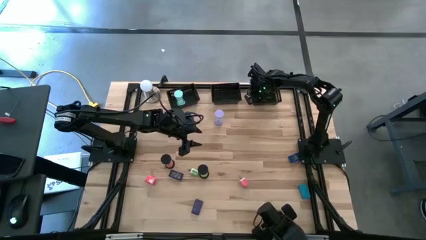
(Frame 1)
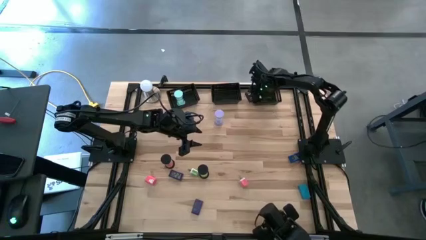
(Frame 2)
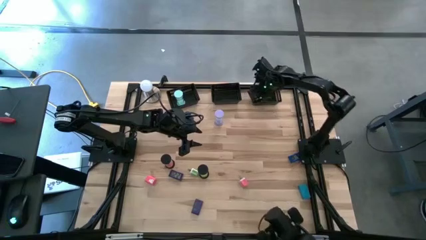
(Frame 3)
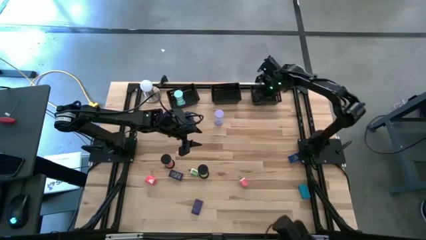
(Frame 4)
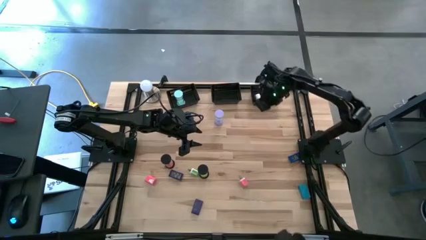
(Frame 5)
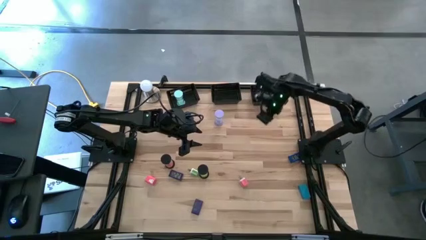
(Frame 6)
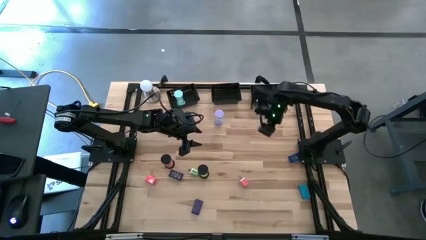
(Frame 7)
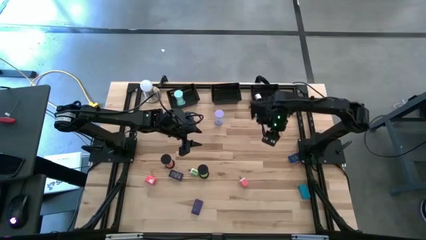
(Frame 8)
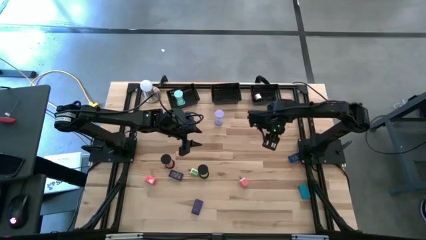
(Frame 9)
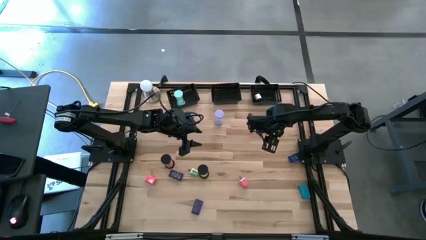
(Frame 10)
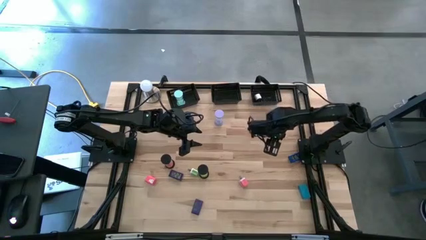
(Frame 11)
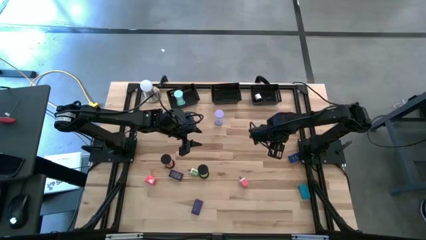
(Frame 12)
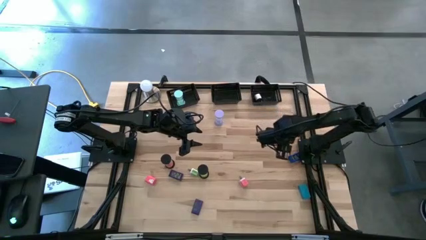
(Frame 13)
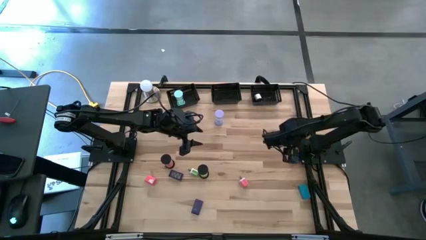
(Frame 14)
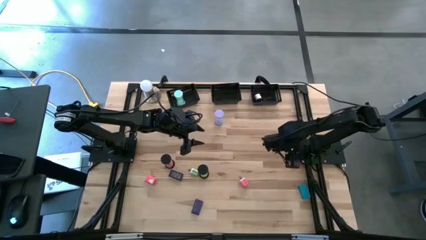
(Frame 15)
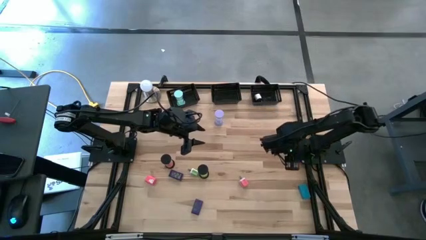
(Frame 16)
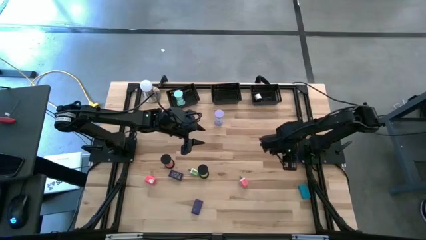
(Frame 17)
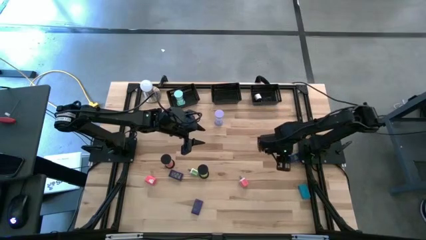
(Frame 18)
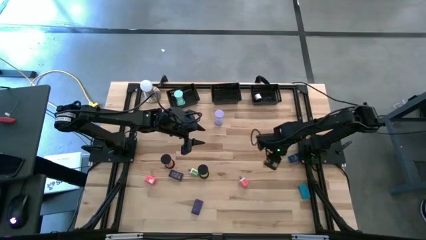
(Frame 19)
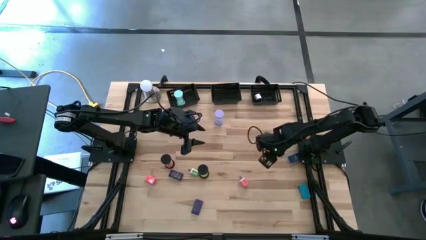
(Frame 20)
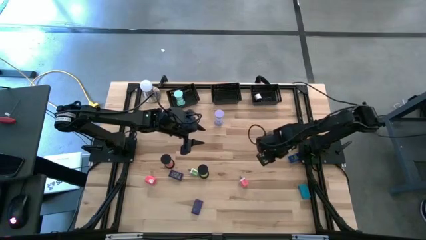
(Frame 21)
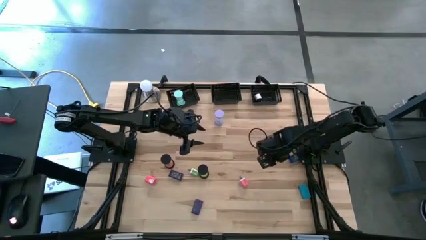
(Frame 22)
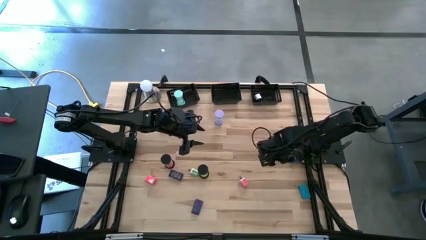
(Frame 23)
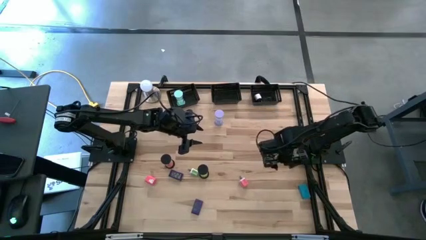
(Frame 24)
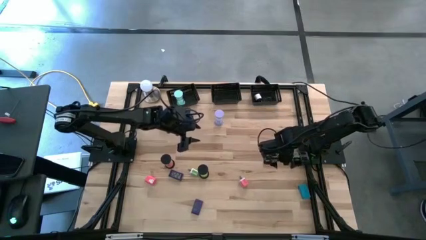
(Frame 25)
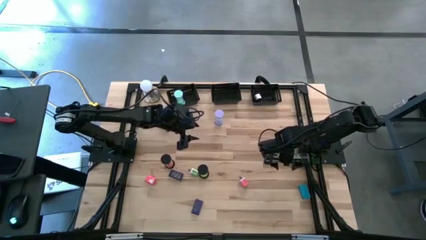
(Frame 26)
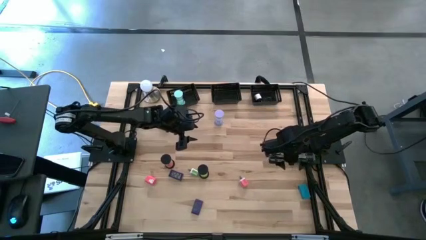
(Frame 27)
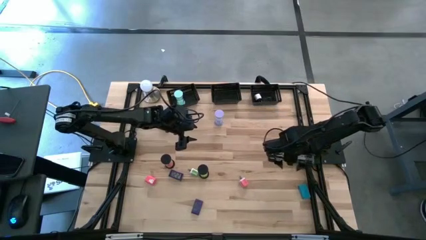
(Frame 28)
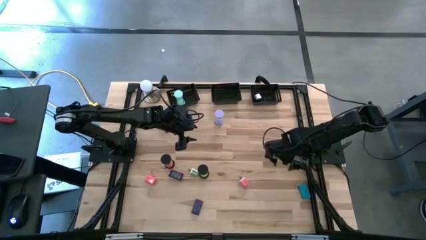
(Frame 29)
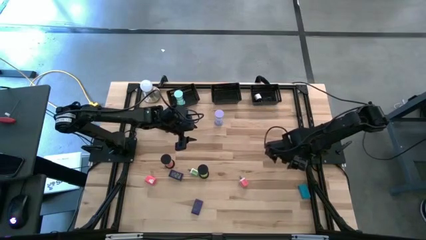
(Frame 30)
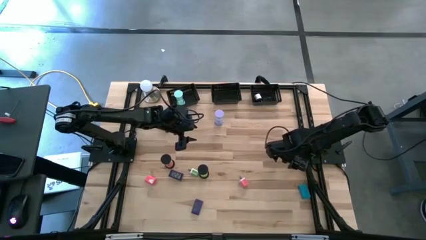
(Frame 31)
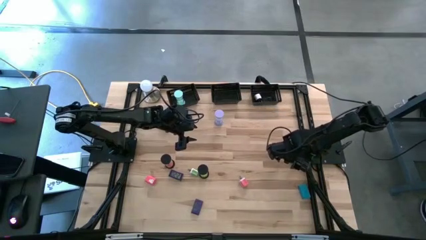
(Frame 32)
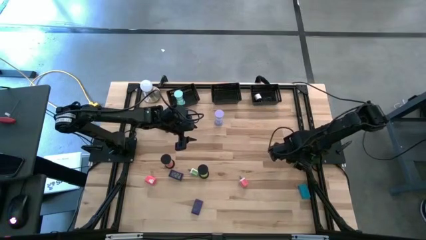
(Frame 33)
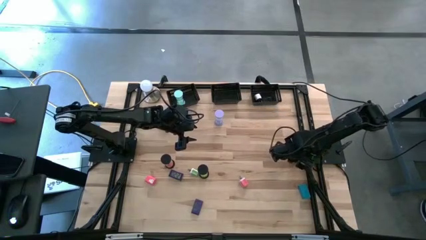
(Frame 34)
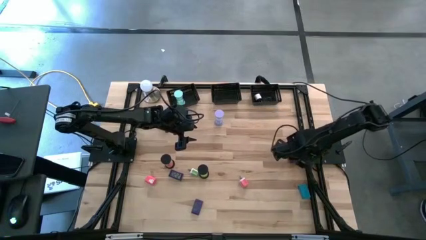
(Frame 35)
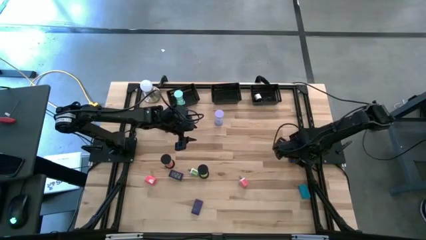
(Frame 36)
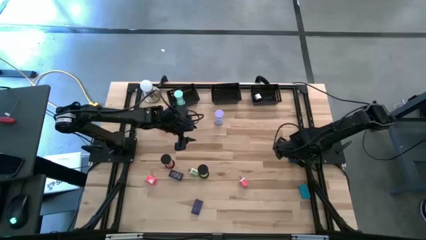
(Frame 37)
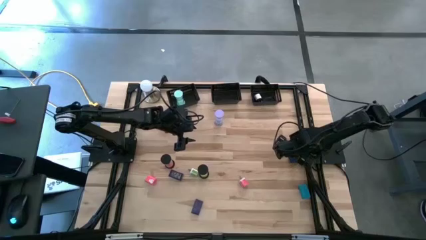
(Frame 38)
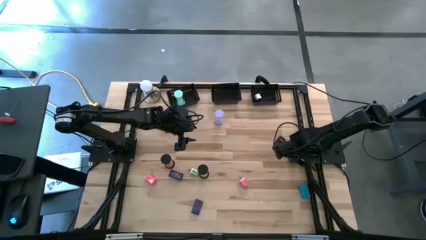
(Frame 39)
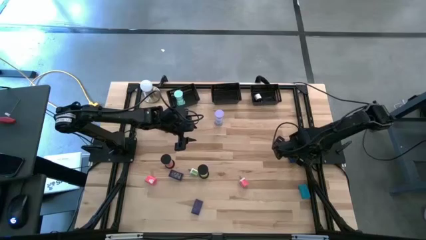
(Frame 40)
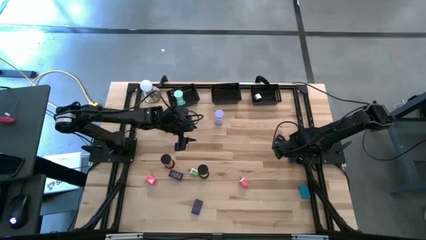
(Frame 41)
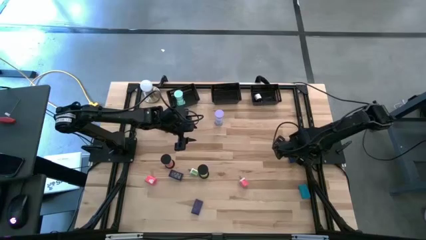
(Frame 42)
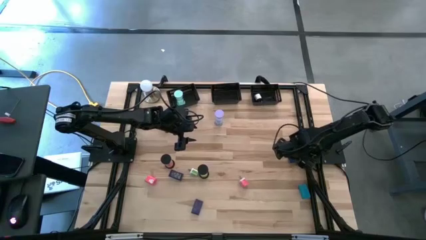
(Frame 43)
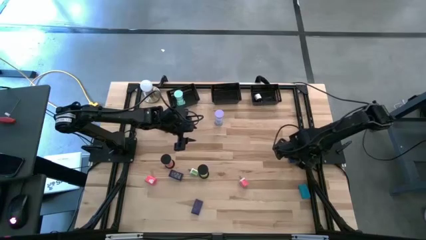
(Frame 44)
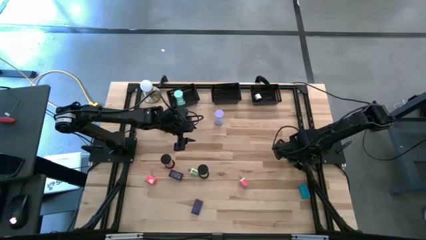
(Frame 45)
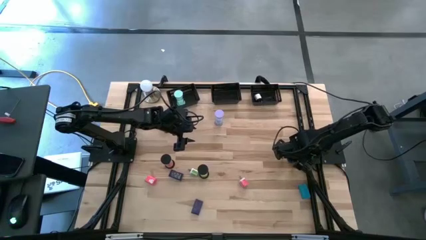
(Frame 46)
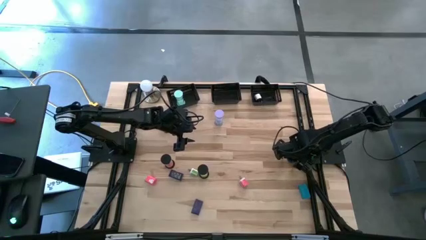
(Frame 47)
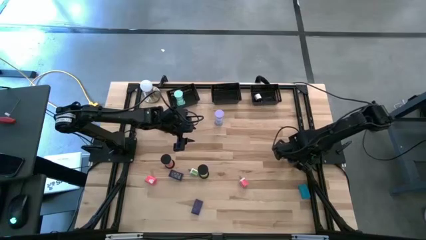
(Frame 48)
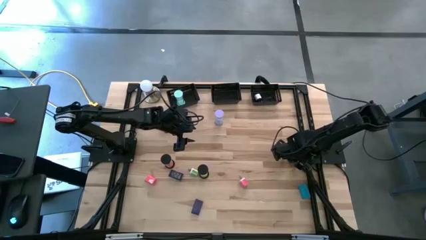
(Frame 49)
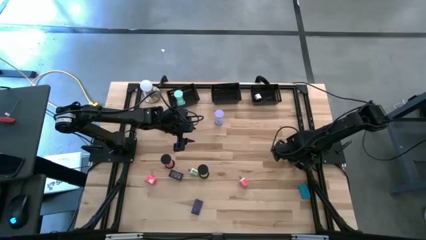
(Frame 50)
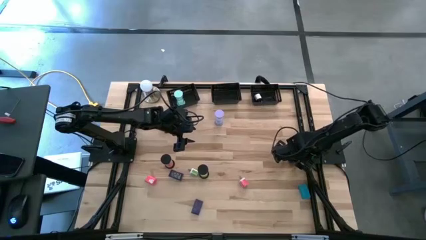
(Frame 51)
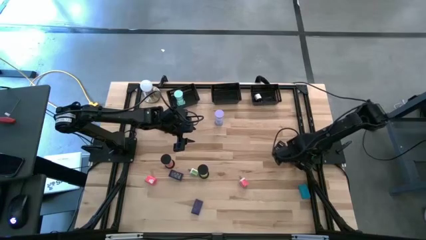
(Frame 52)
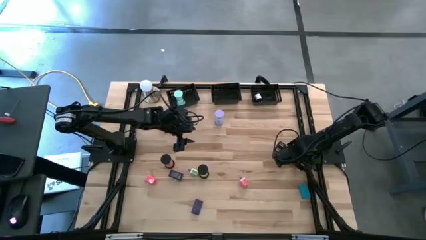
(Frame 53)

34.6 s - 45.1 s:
Task: Pick & Place Office items
Put the dark blue digital clock into the middle black bin
